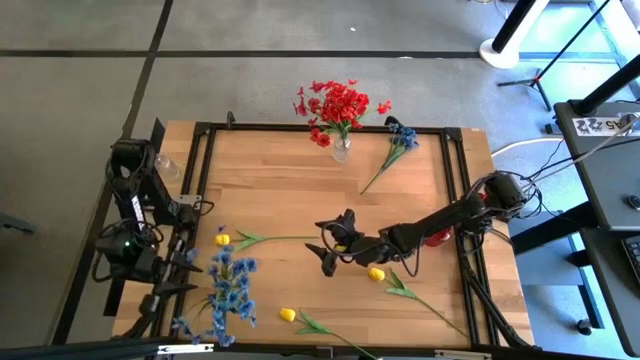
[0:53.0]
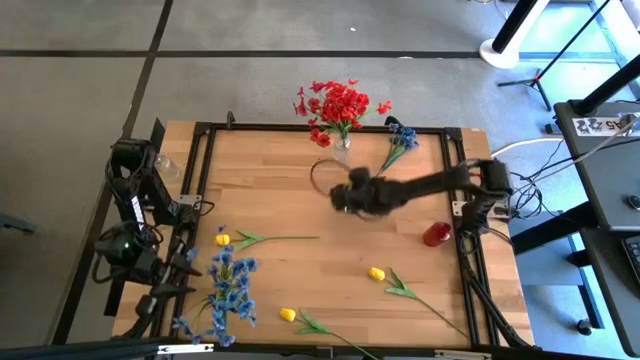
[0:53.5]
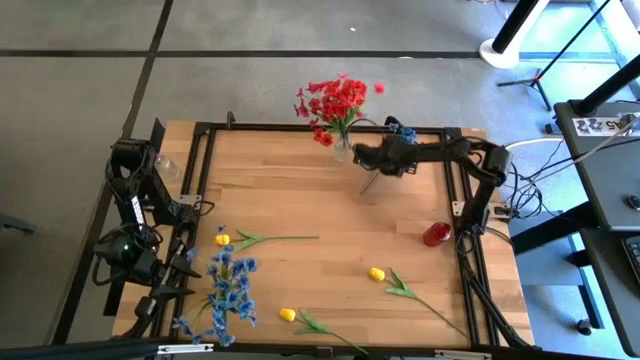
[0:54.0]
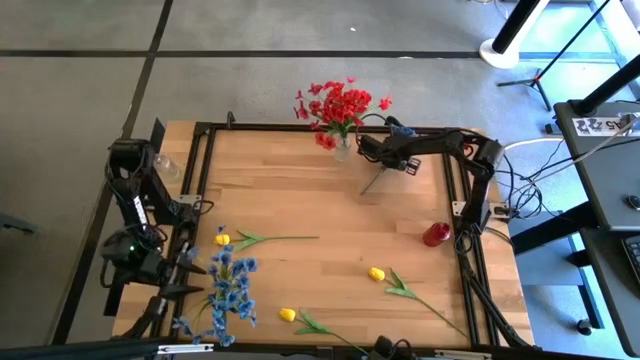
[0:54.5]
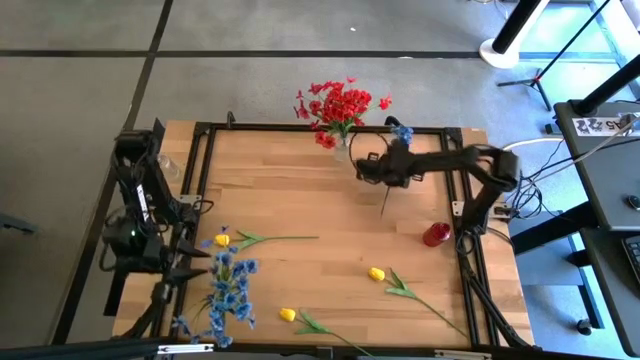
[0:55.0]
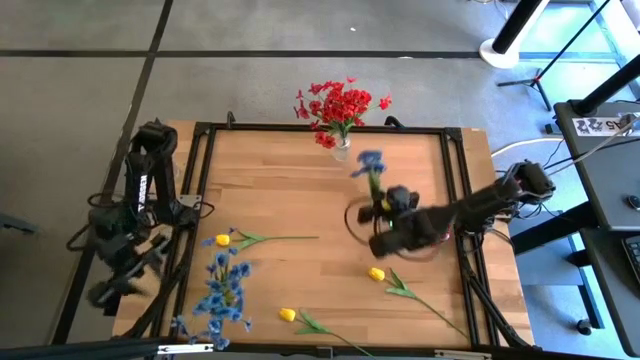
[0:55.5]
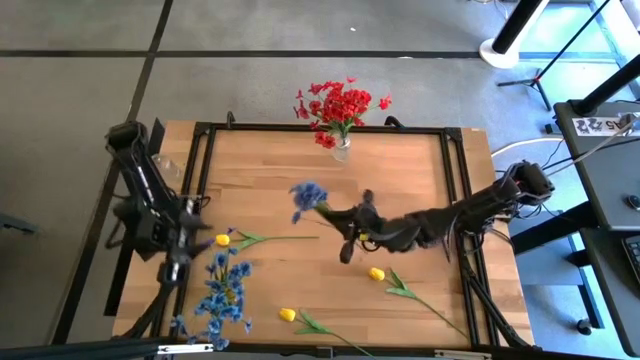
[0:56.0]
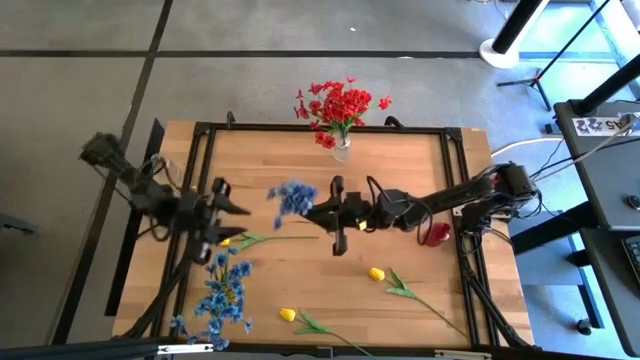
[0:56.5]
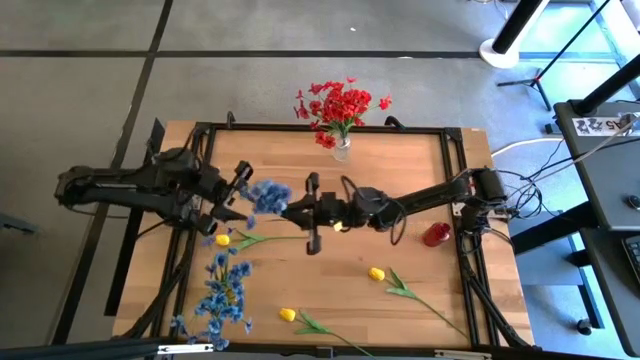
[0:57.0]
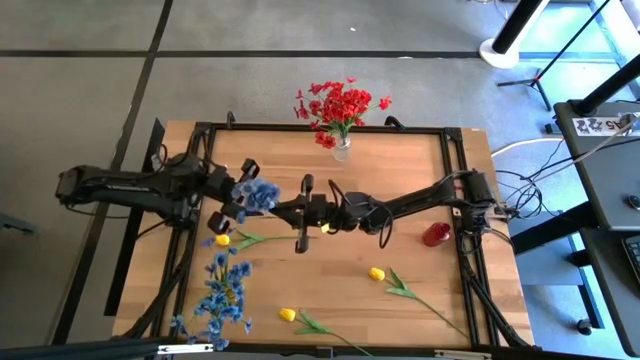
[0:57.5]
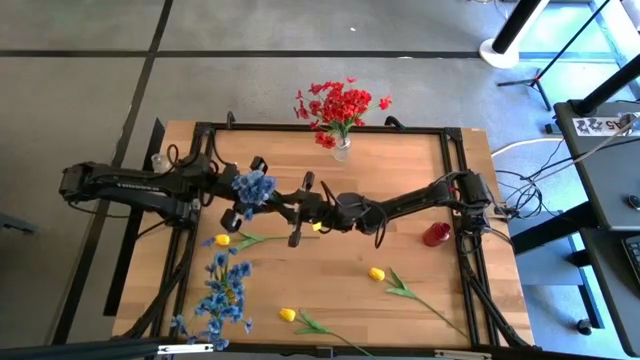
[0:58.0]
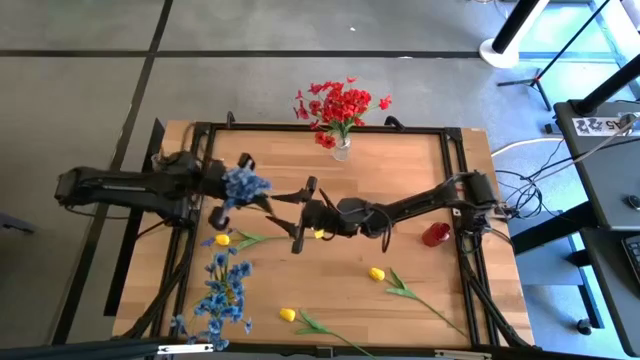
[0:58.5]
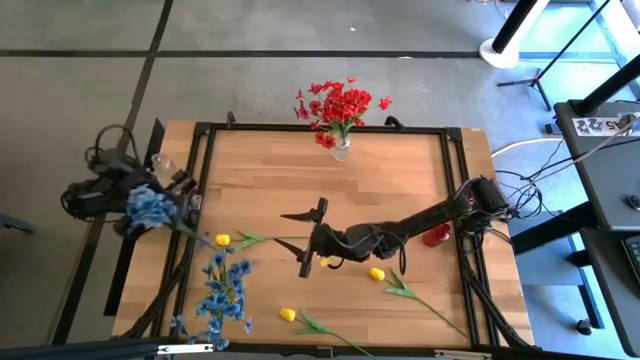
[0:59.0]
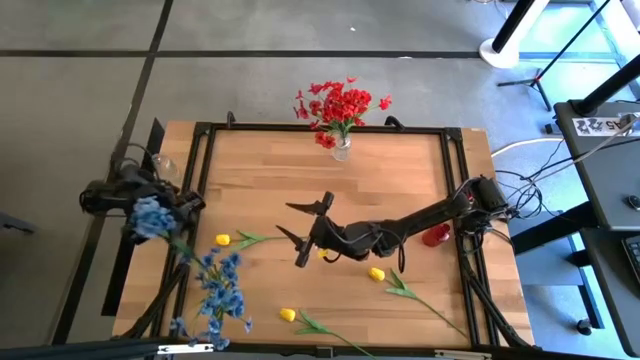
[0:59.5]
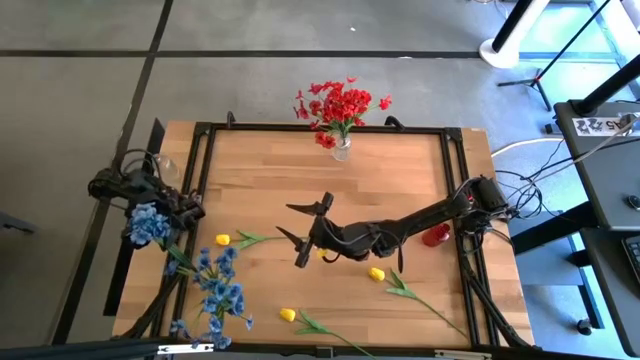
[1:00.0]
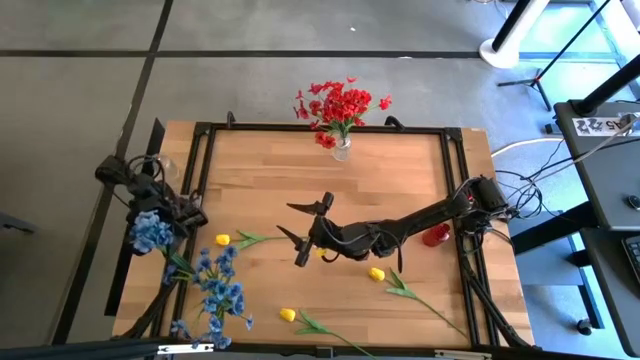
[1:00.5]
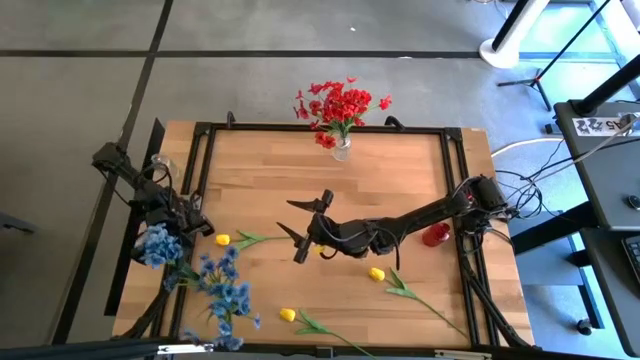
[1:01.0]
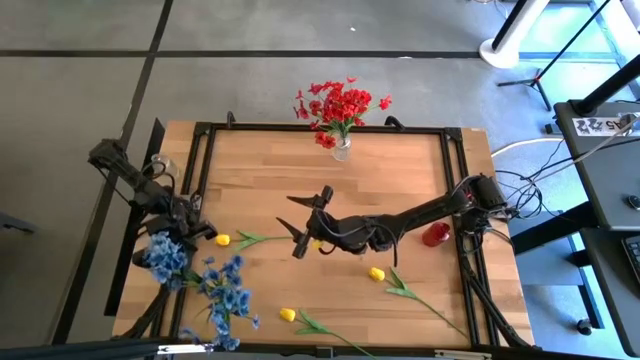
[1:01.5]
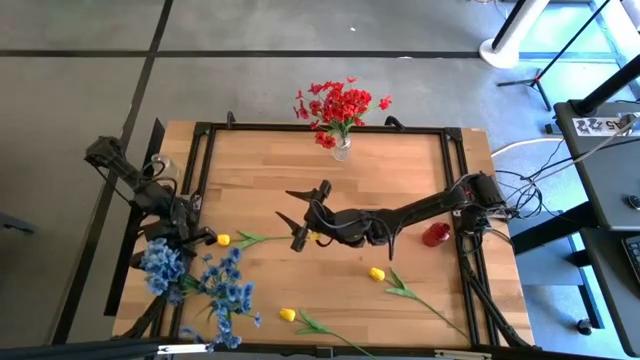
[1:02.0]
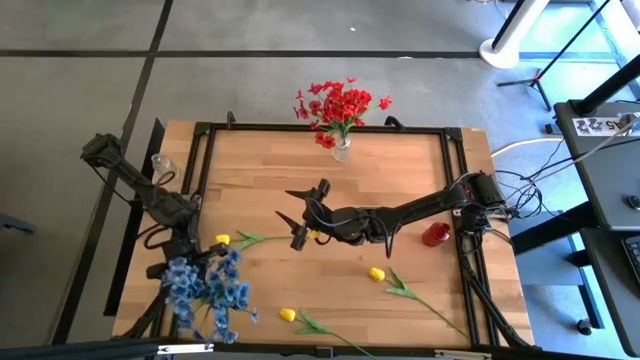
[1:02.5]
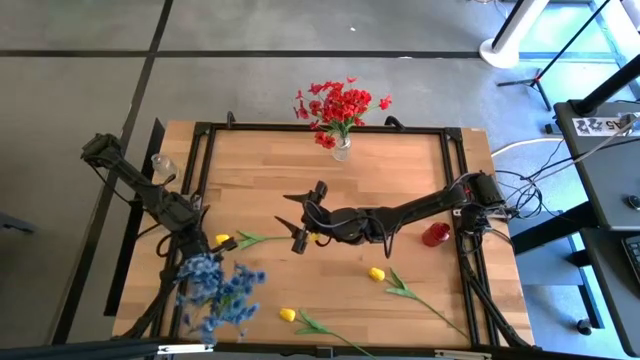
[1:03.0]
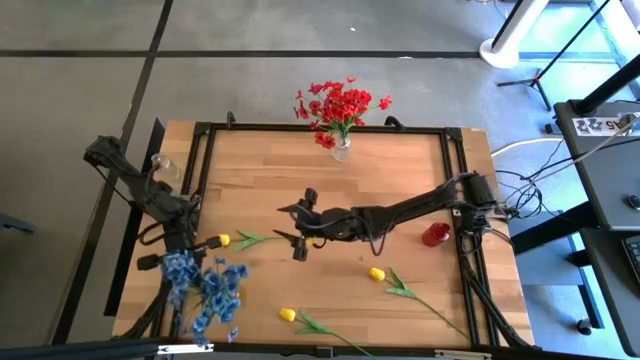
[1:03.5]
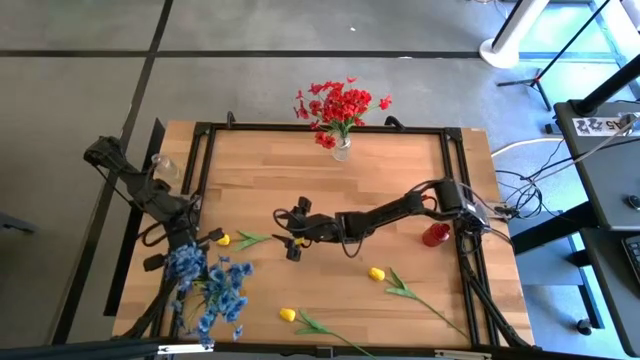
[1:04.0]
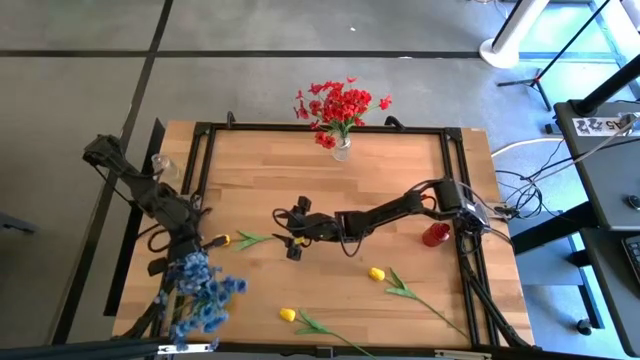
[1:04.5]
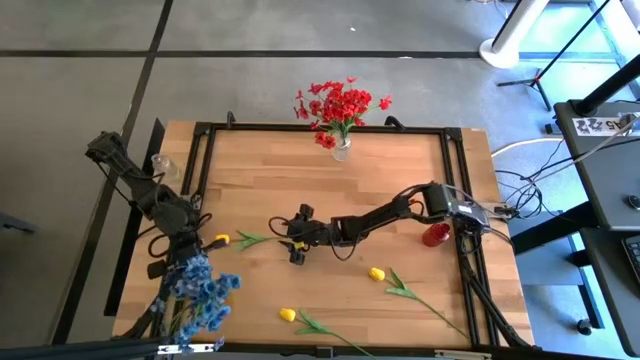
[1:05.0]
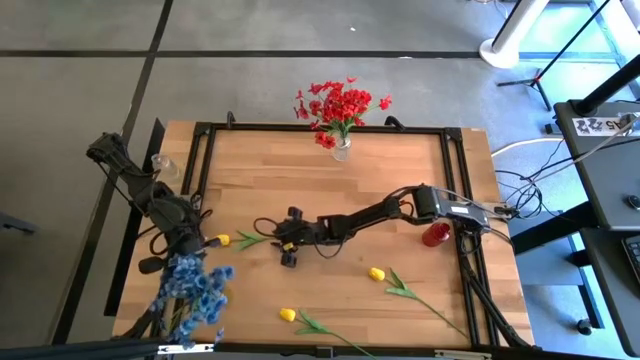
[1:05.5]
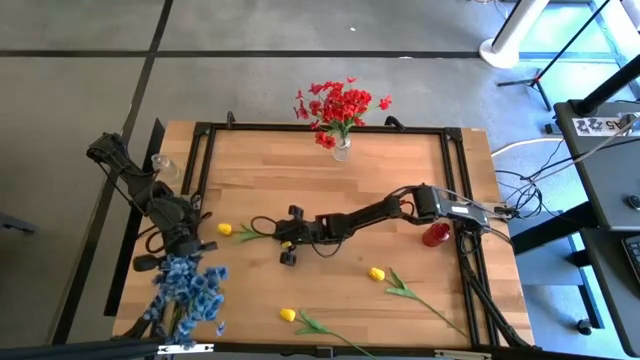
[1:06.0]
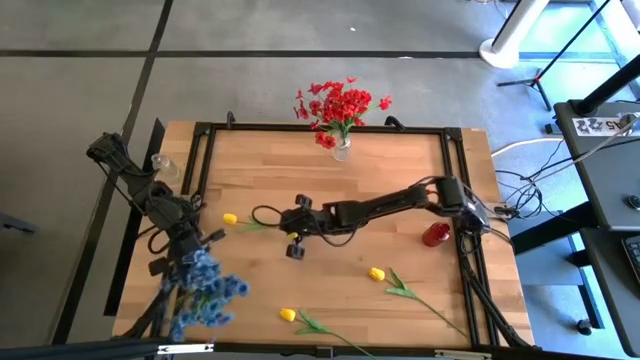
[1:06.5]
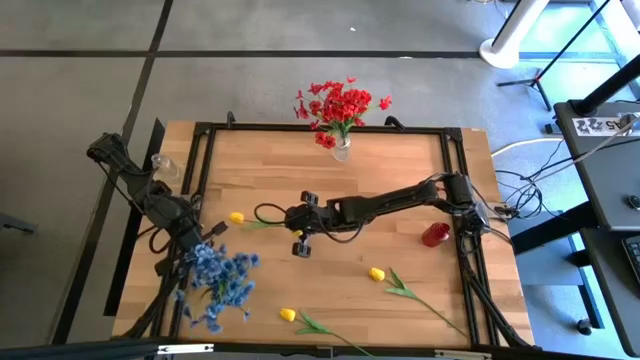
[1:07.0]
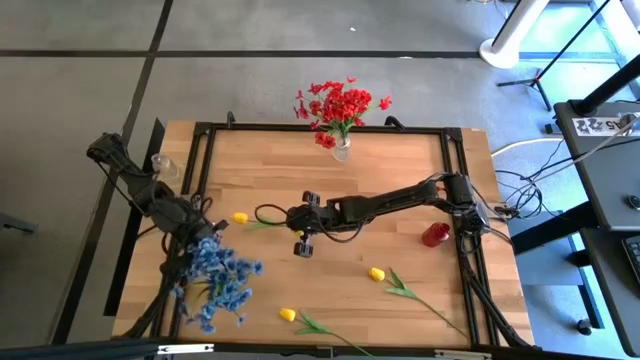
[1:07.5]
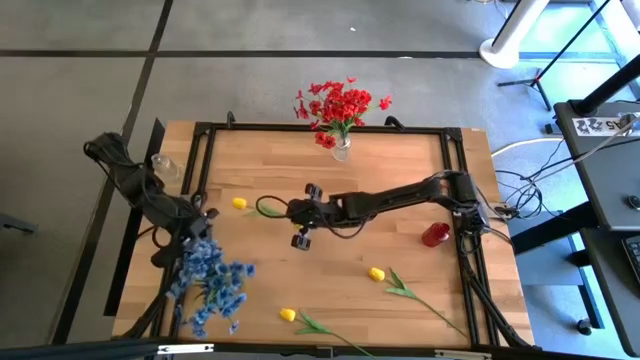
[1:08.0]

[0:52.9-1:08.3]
Task: Sort flowers into vase by color
Put the blue flower into the yellow vase

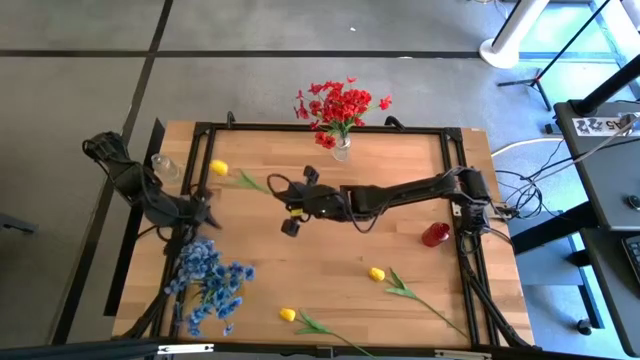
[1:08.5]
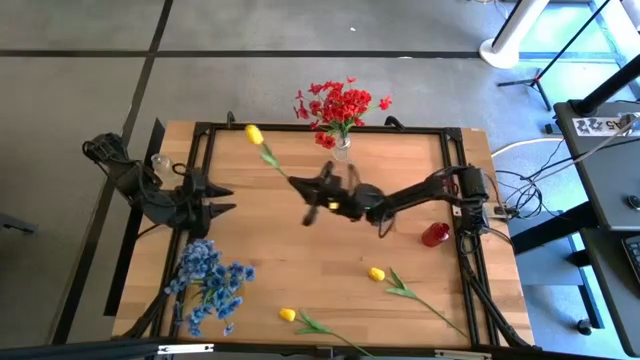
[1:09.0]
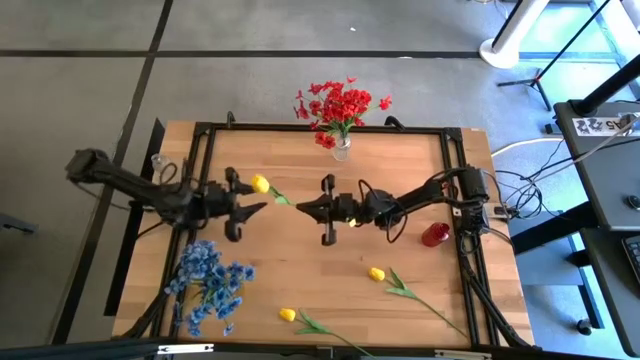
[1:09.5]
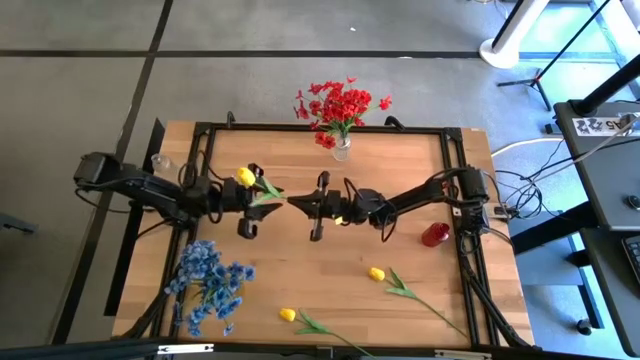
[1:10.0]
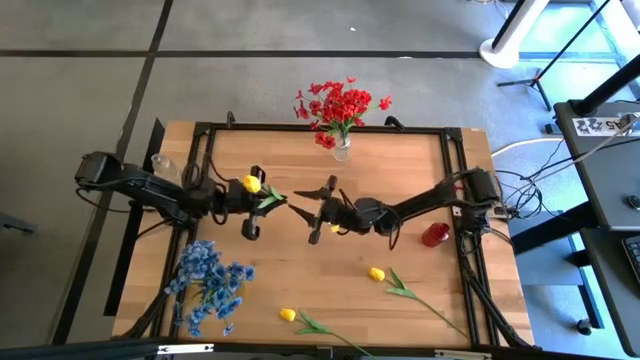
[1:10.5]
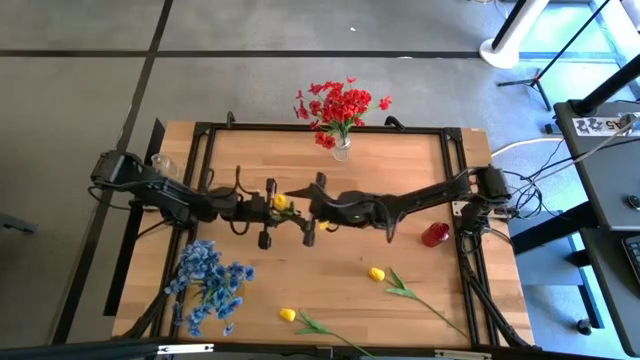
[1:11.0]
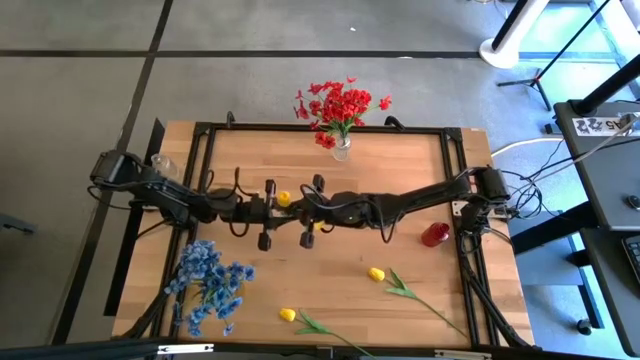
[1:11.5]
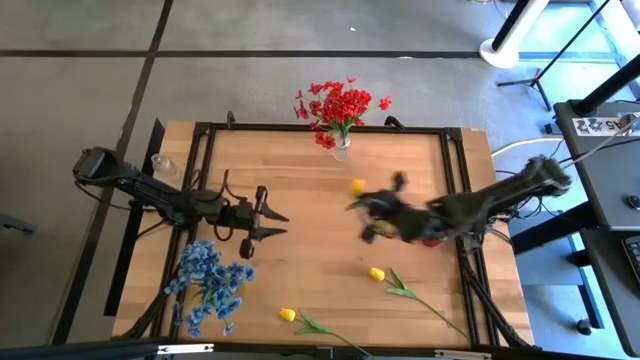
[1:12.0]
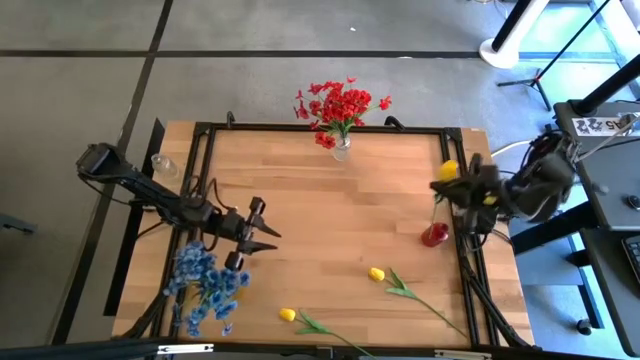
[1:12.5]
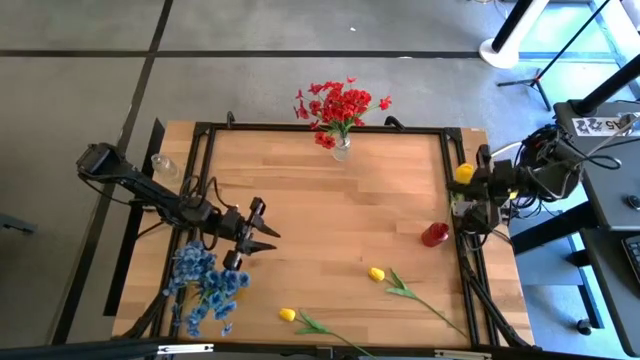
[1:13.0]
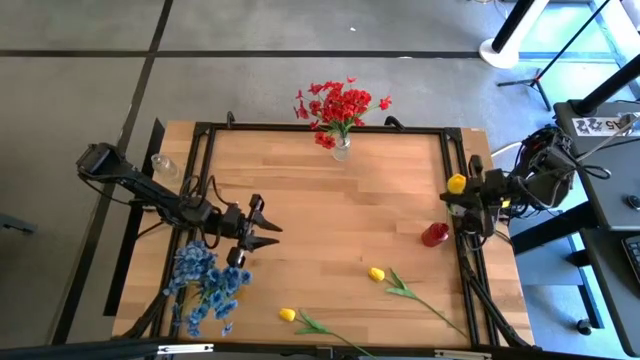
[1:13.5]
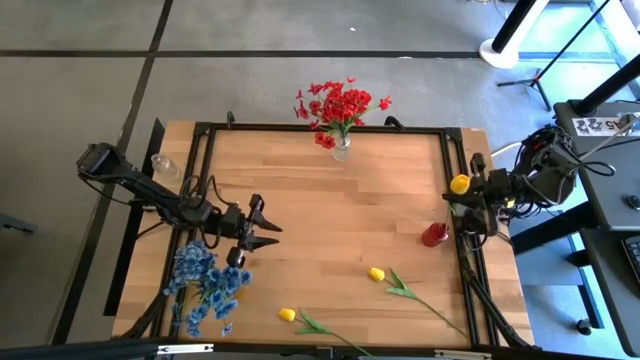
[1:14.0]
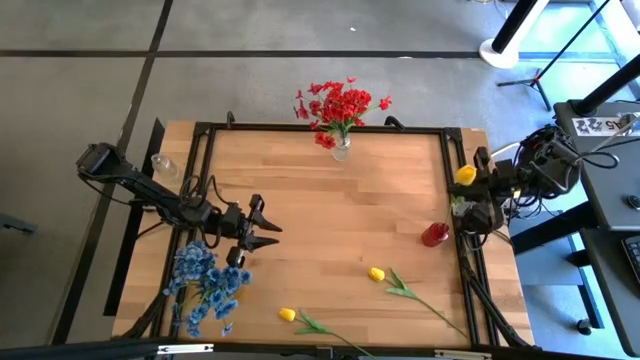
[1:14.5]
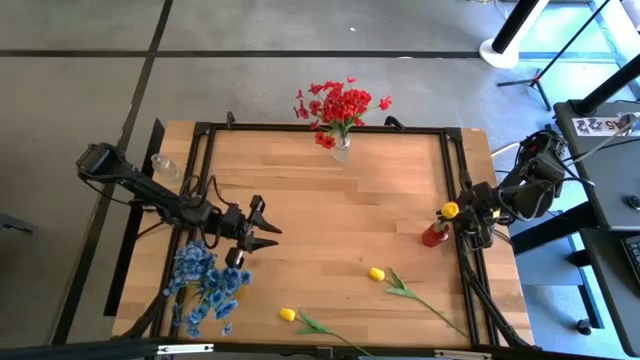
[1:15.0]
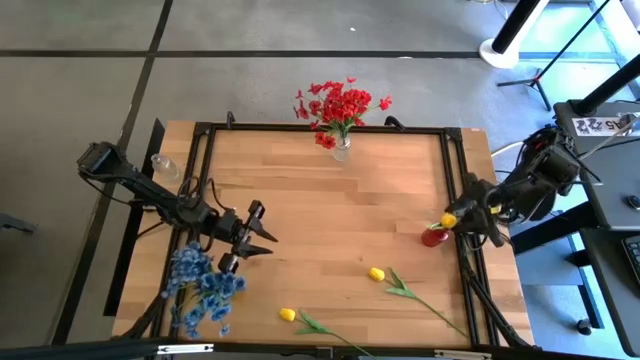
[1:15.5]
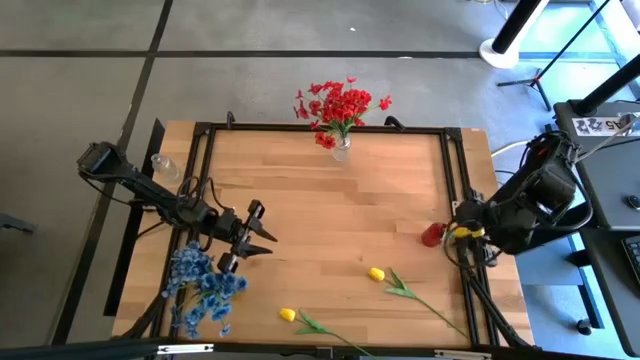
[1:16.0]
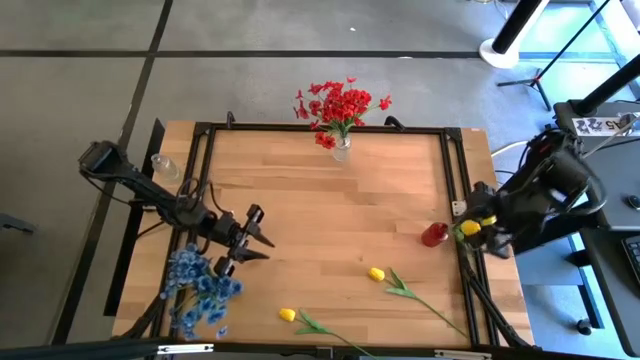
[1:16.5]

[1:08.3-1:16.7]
Put the top right yellow flower into the red vase
